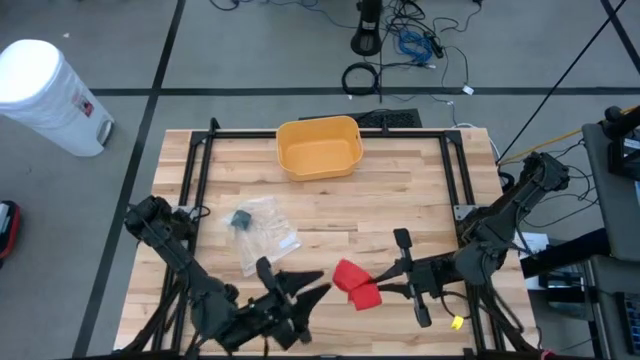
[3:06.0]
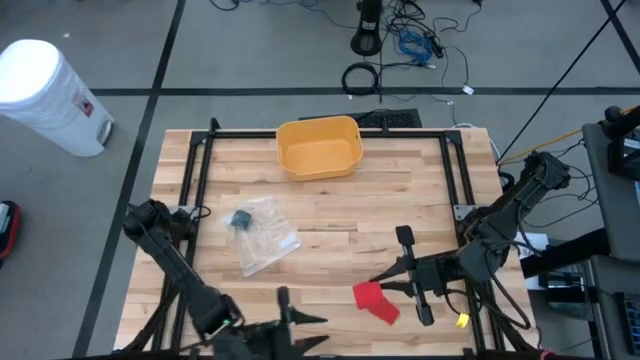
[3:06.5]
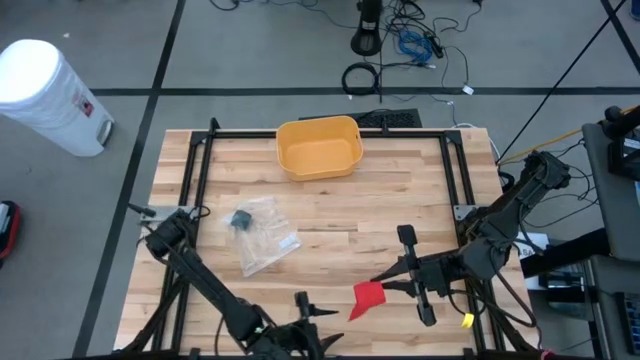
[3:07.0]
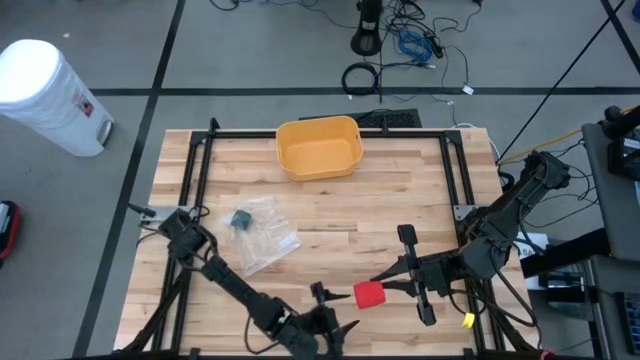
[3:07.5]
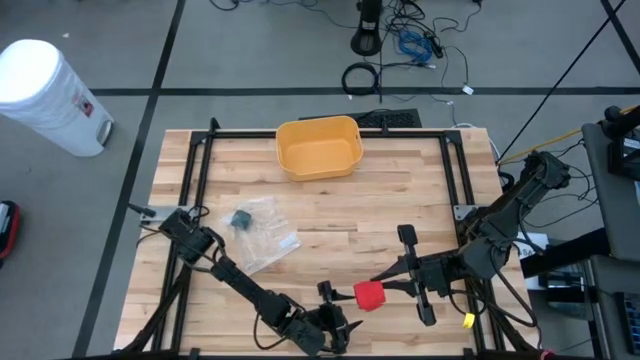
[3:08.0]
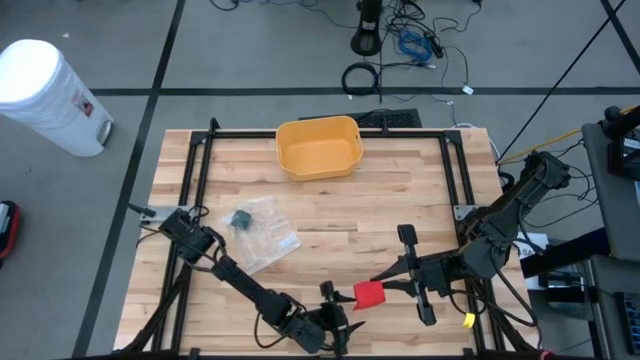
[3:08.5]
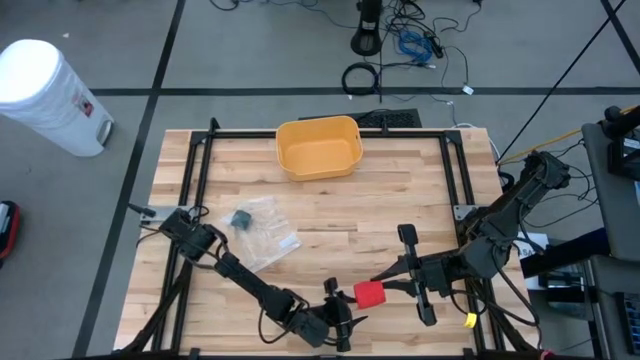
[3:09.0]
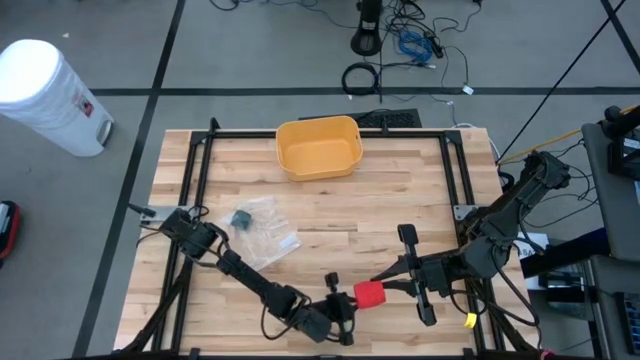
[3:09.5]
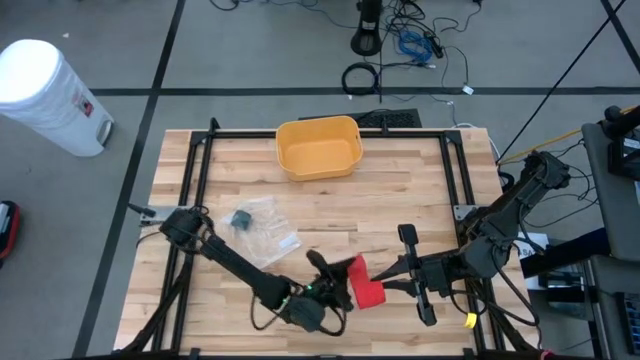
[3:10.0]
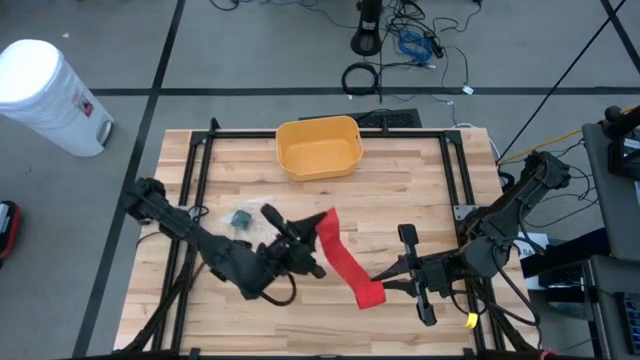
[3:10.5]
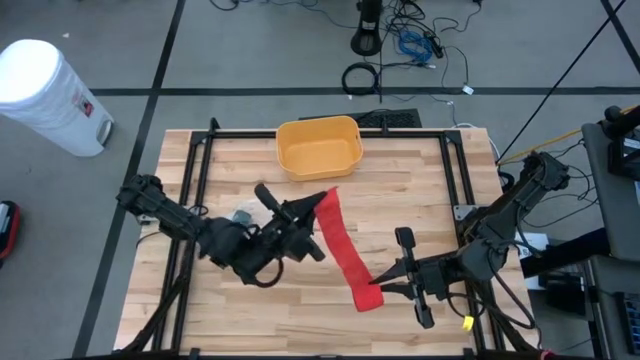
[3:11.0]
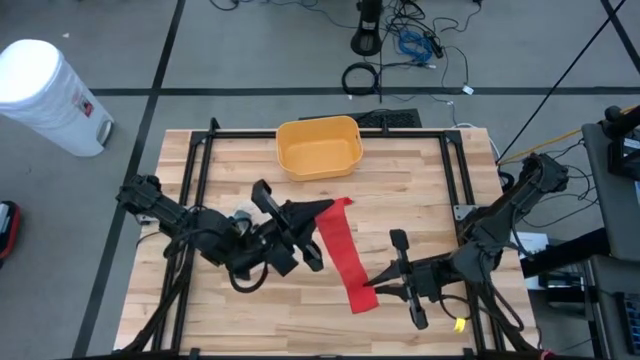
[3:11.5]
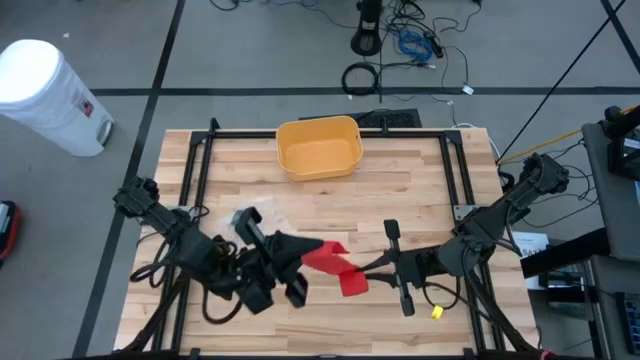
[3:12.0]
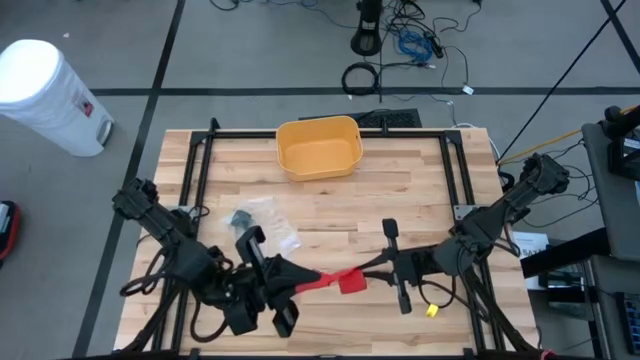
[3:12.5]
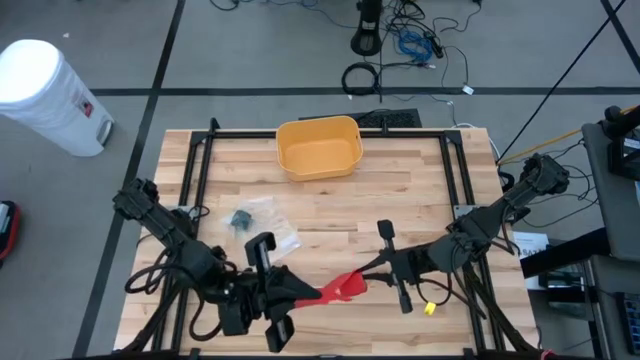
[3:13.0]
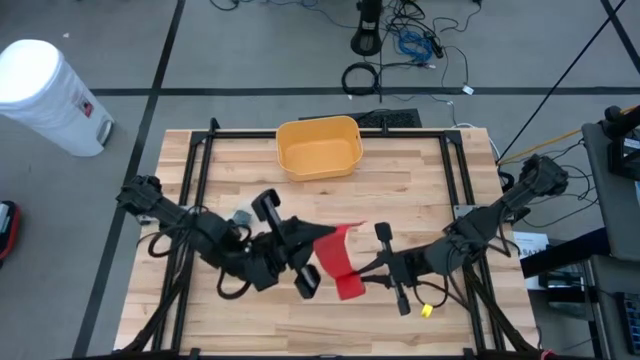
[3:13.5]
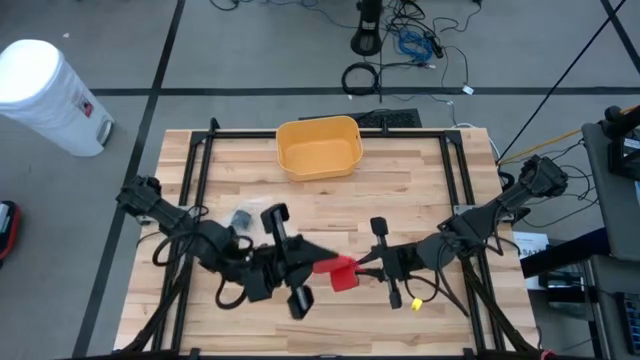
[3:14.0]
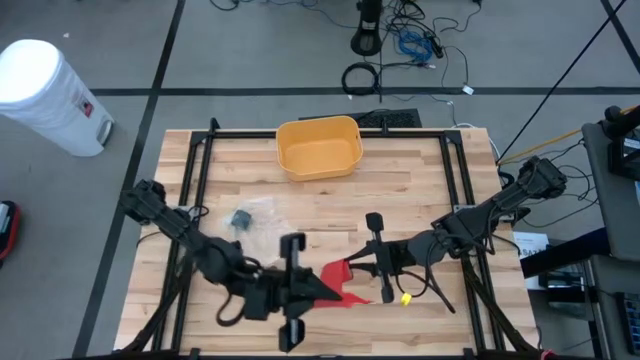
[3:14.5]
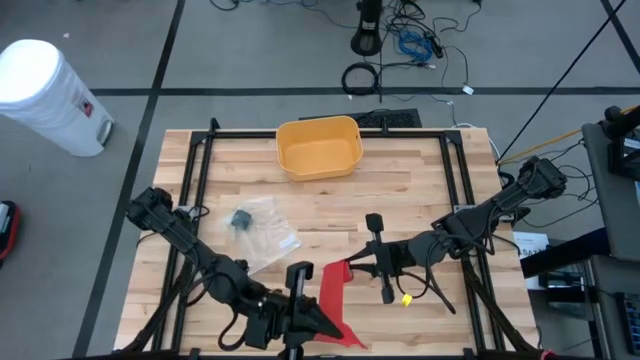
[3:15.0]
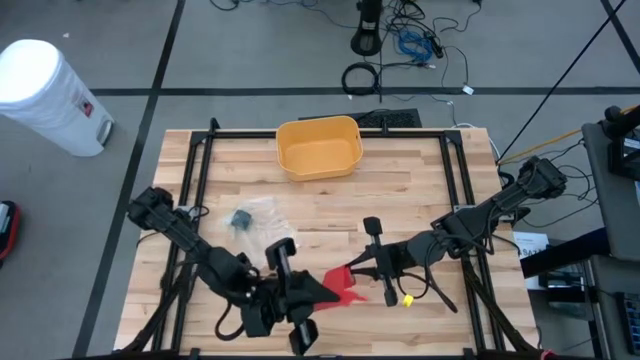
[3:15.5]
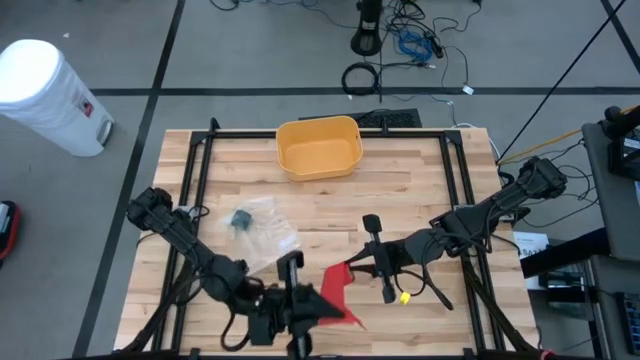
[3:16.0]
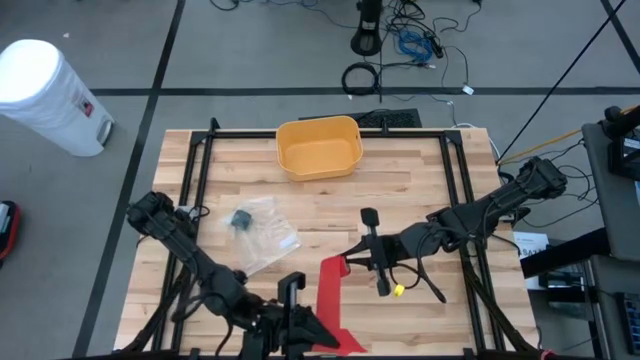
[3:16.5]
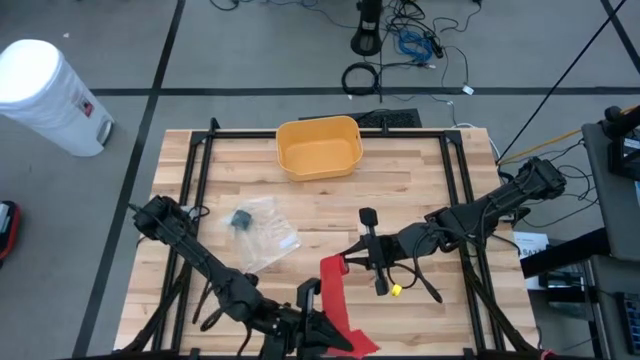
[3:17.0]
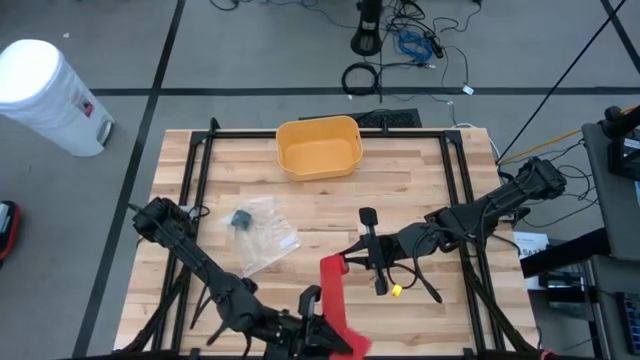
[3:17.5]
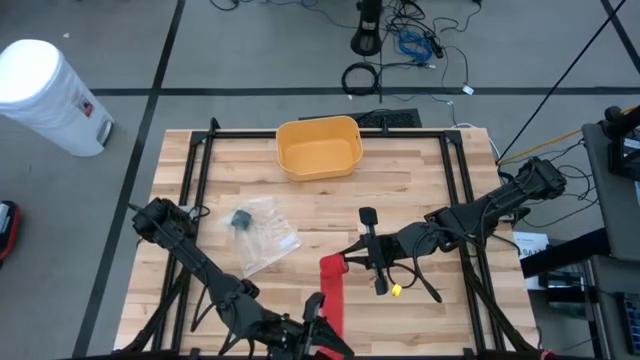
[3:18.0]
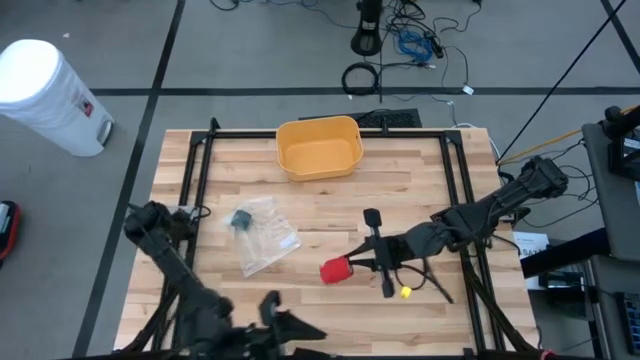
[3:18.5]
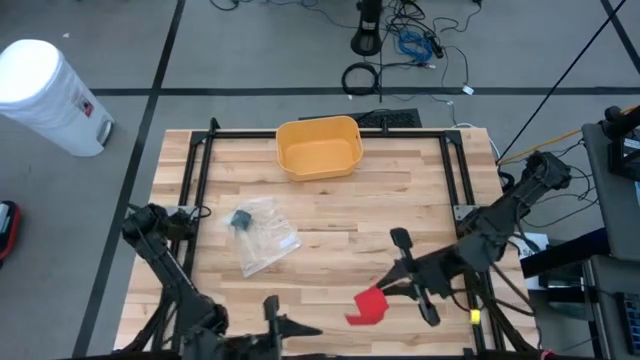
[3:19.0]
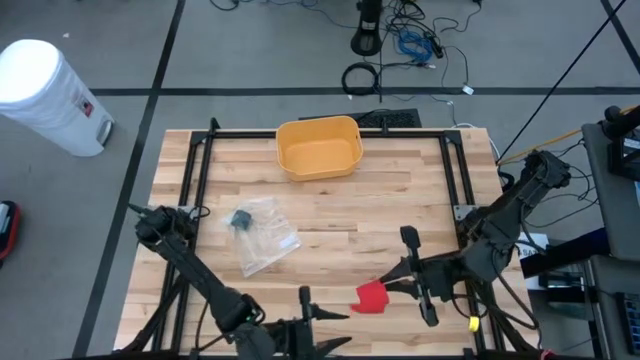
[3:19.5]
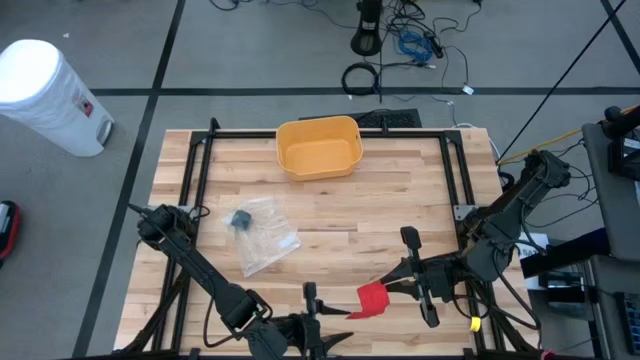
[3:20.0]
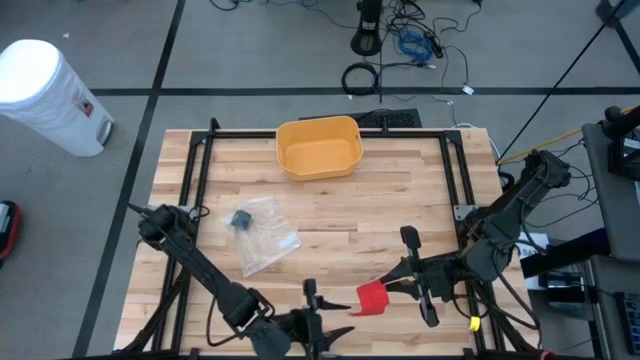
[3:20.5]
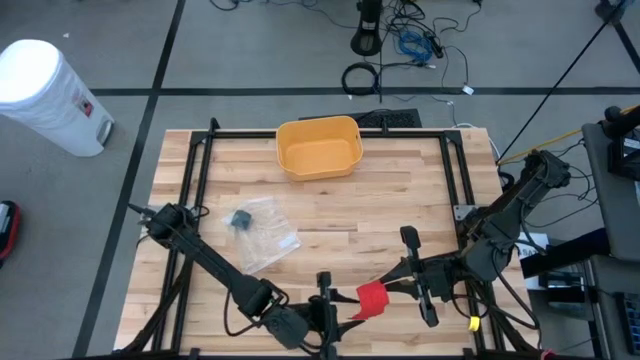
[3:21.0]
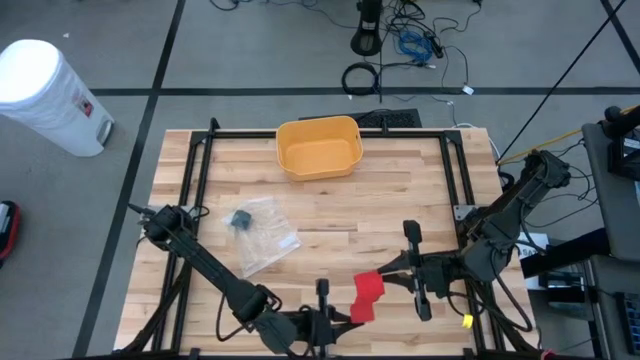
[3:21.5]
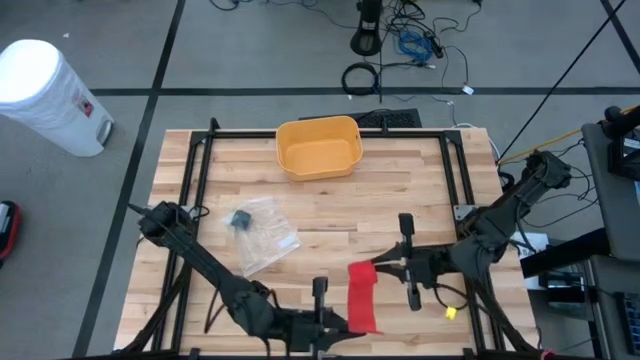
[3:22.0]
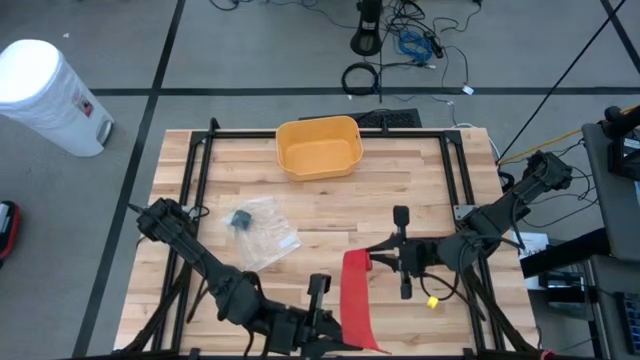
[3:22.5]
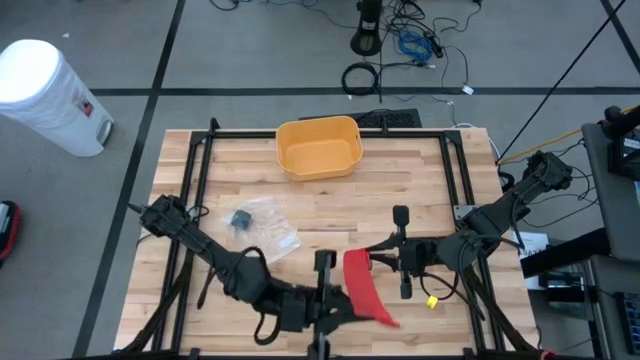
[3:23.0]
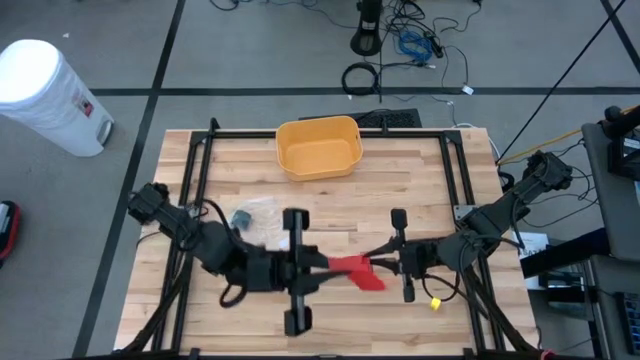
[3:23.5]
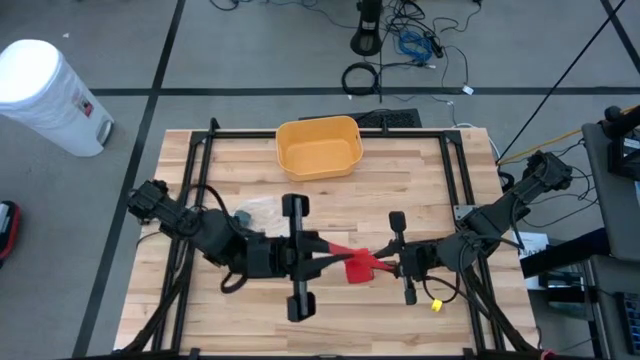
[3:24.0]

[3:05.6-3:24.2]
Task: Roll bandage
Roll the red bandage

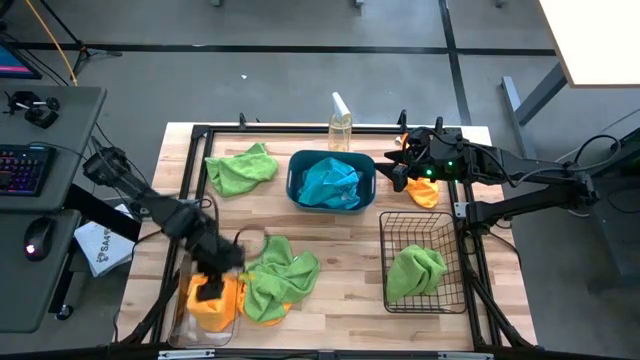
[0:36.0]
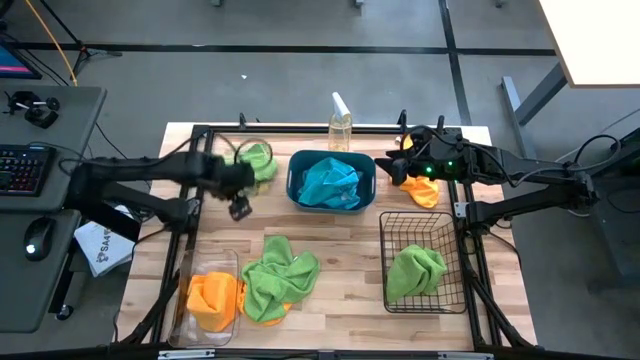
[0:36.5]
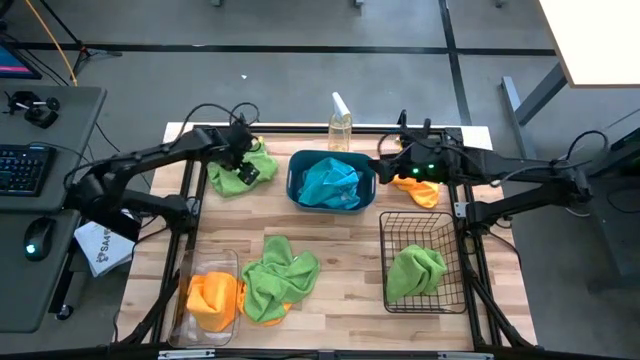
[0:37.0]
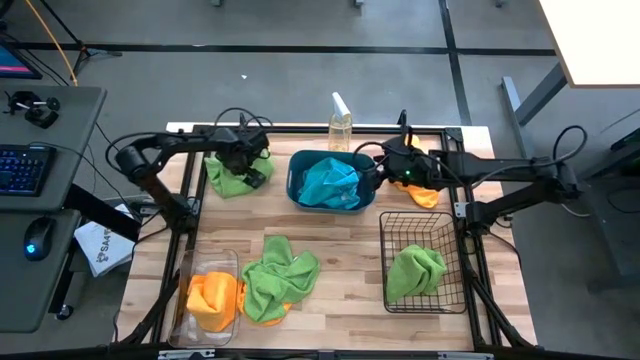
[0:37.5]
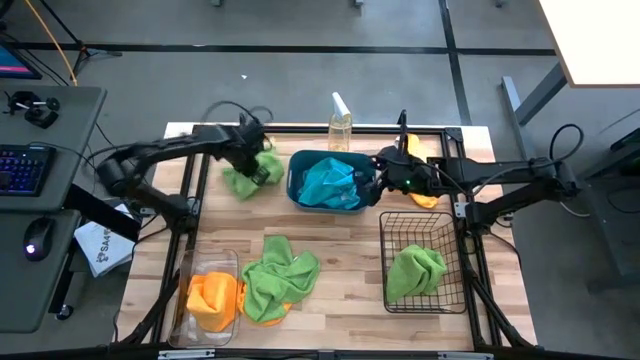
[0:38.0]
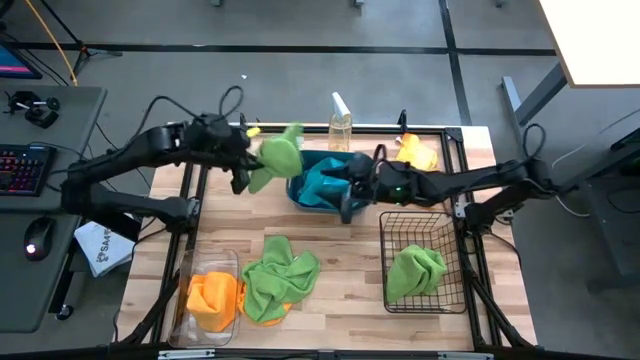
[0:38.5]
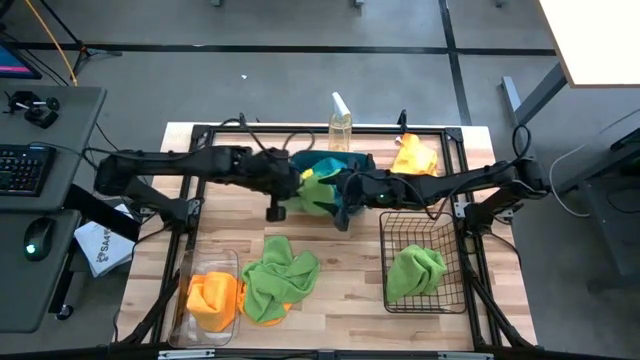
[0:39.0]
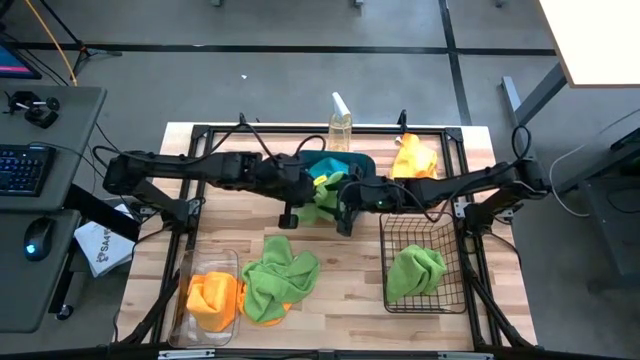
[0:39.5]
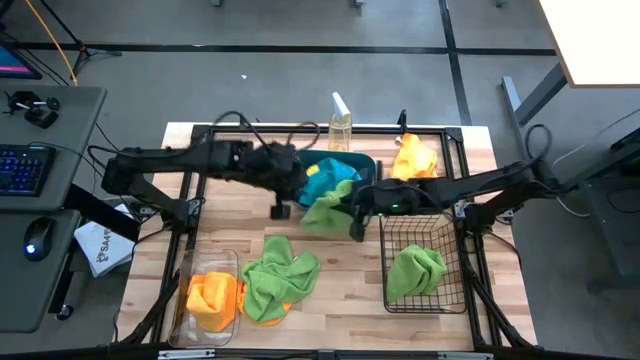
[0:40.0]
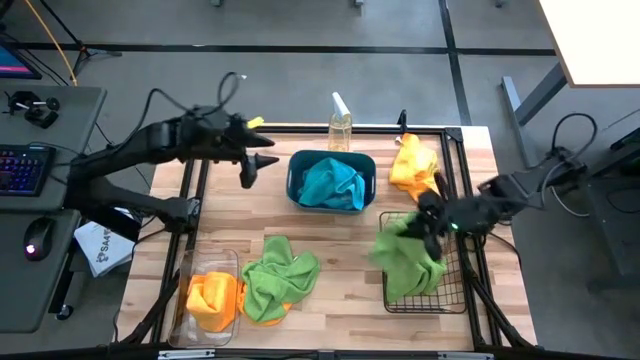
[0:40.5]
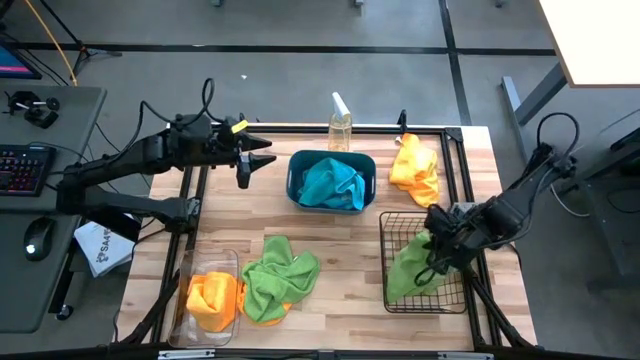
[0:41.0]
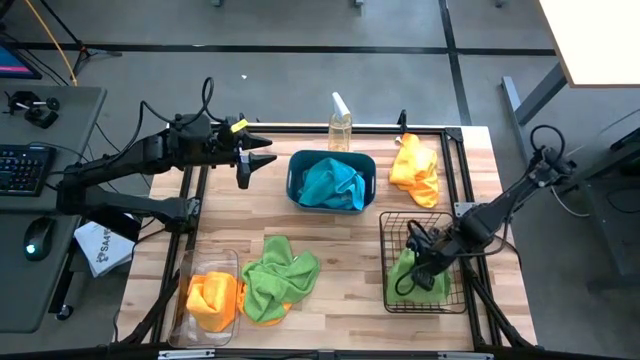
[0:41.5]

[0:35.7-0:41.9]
Task: Sort microfiber towel by color & place in baskets
Put the top green towel into the black wire basket
